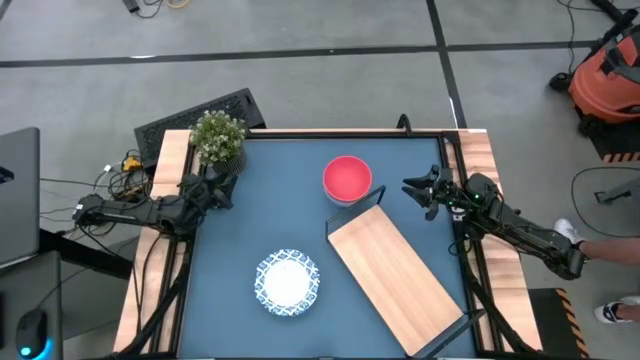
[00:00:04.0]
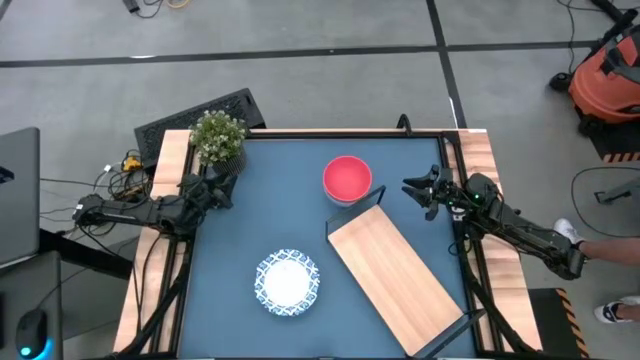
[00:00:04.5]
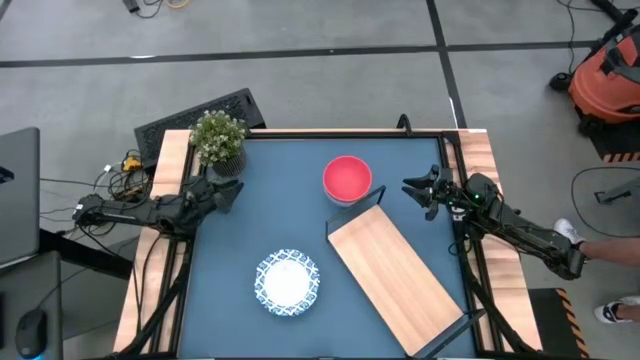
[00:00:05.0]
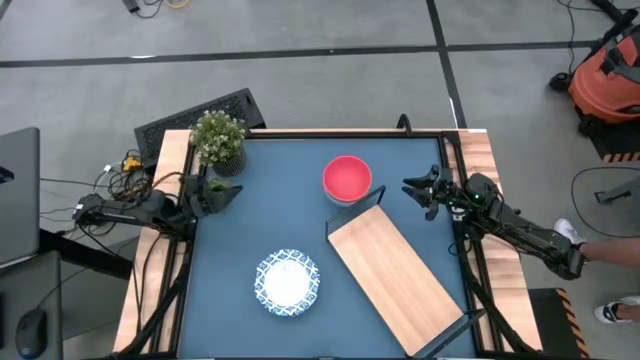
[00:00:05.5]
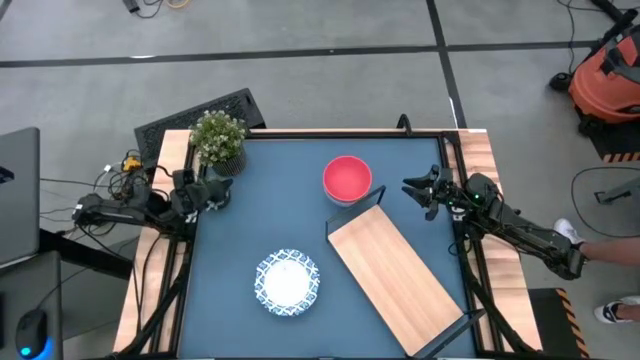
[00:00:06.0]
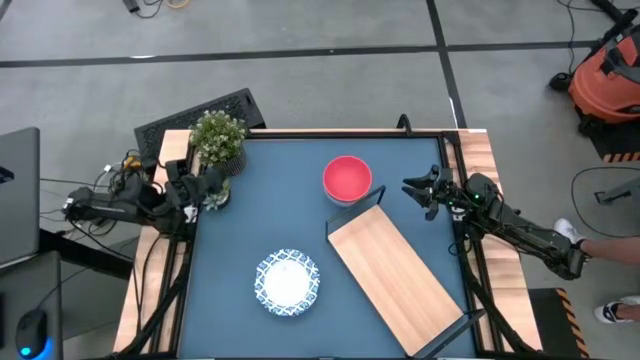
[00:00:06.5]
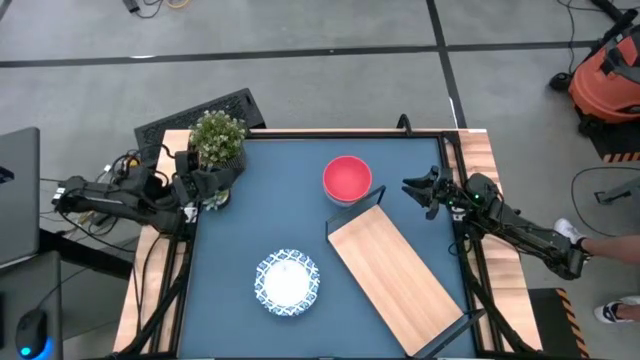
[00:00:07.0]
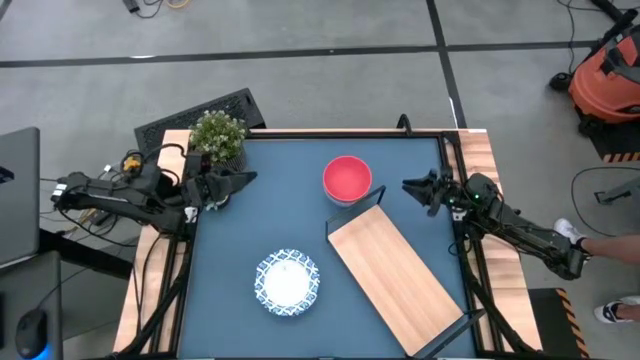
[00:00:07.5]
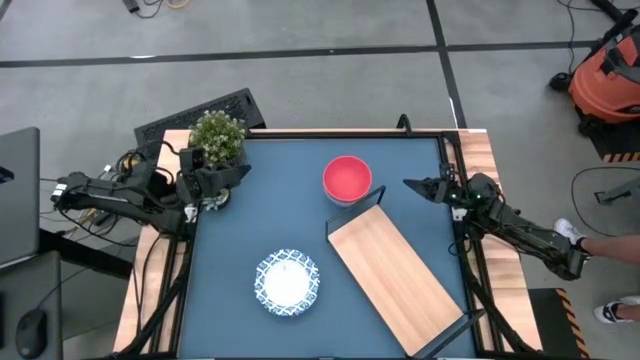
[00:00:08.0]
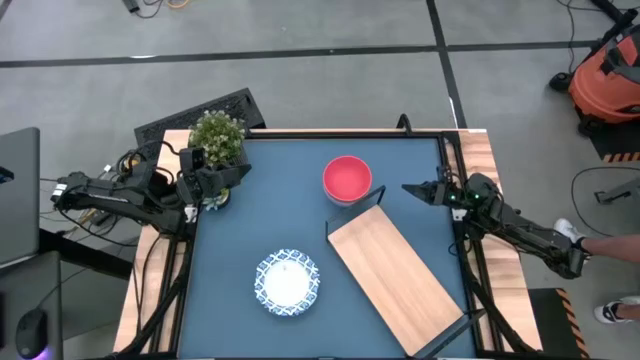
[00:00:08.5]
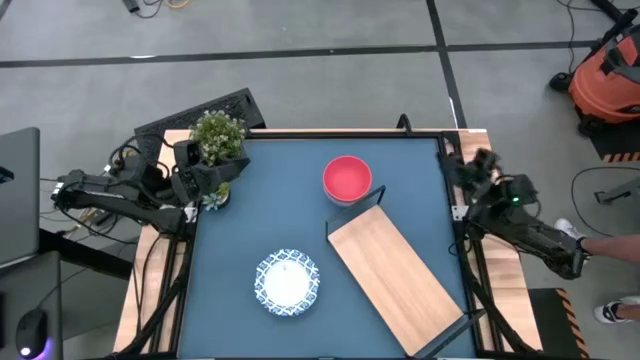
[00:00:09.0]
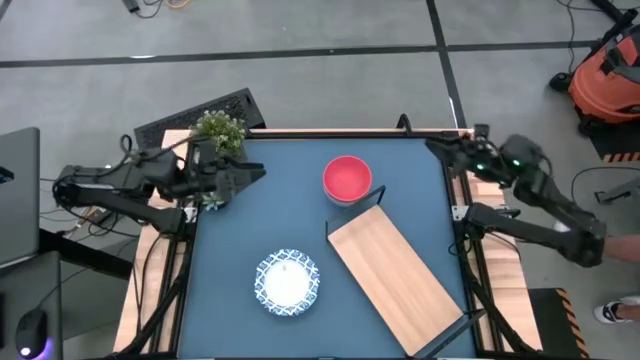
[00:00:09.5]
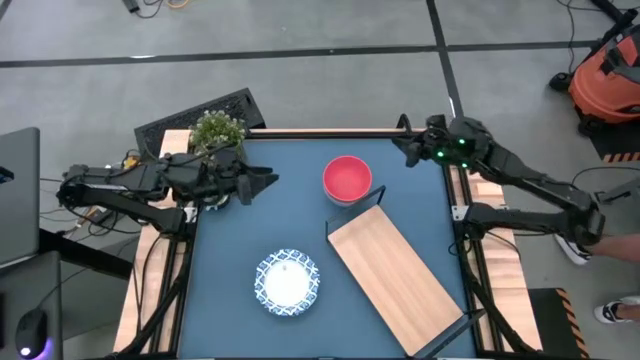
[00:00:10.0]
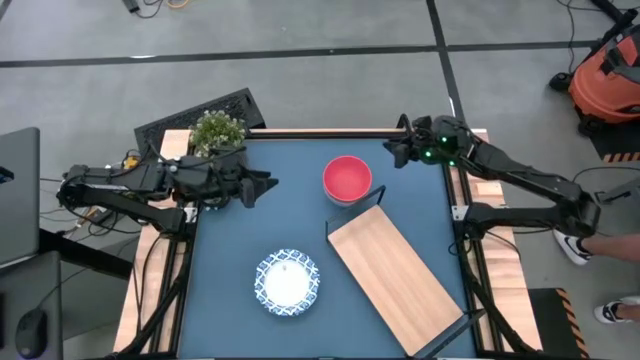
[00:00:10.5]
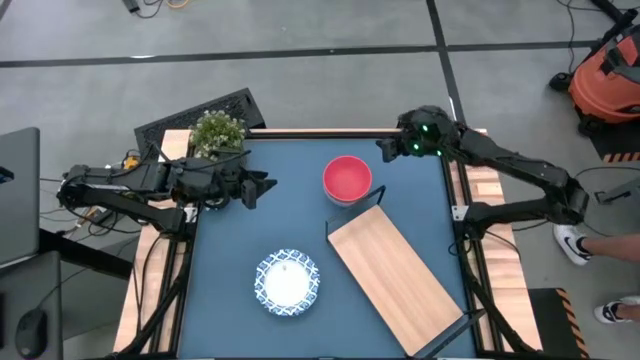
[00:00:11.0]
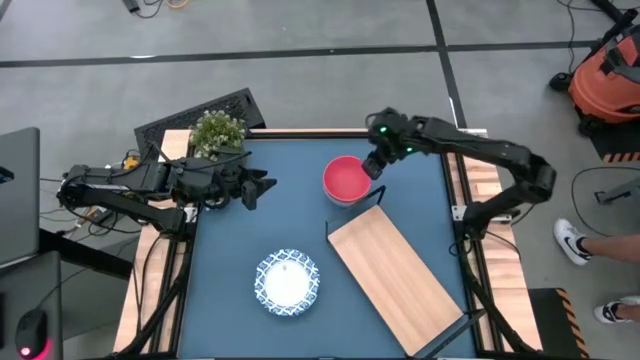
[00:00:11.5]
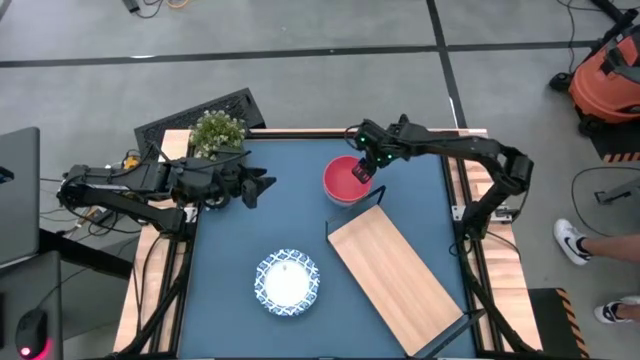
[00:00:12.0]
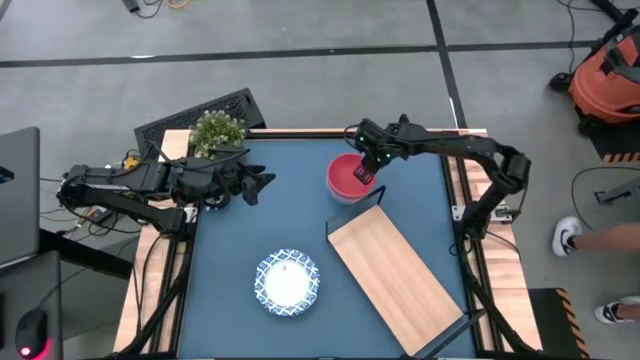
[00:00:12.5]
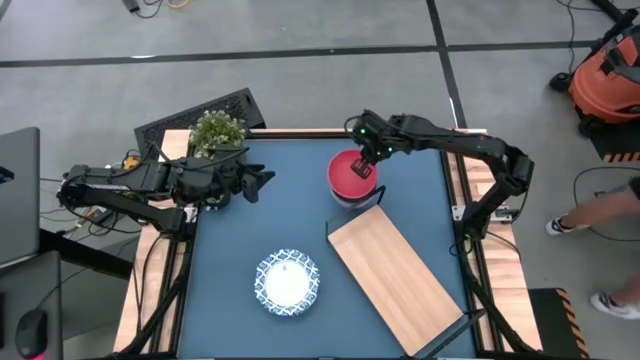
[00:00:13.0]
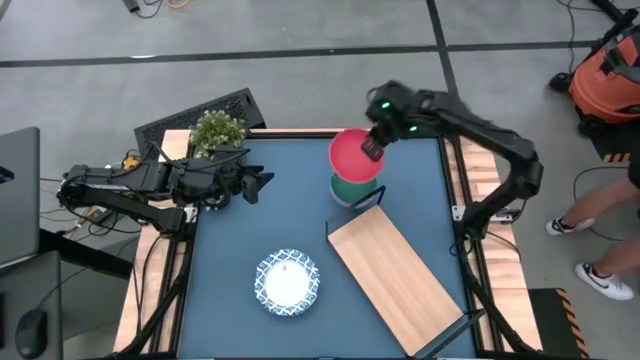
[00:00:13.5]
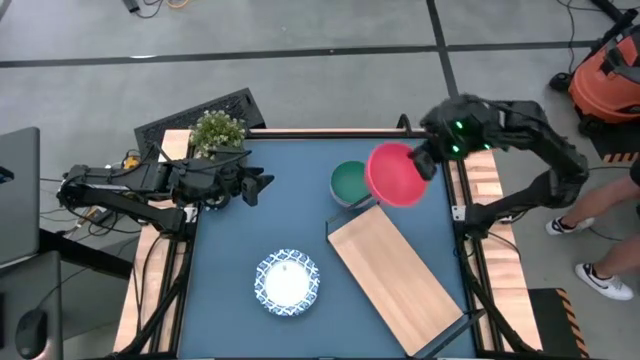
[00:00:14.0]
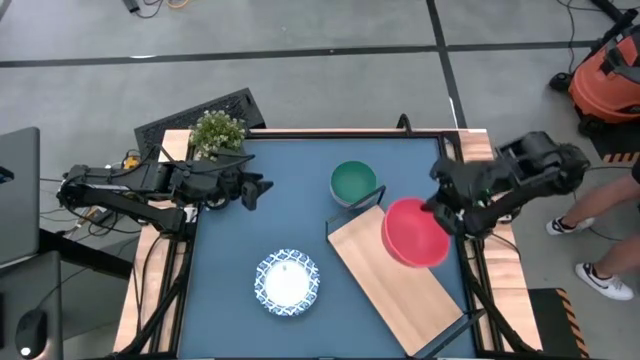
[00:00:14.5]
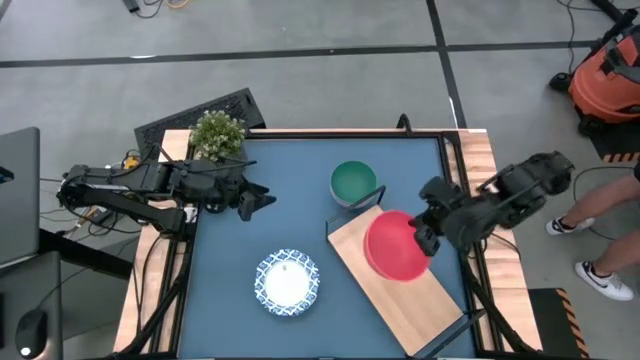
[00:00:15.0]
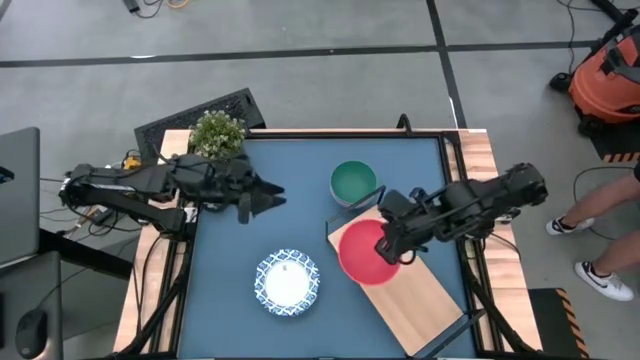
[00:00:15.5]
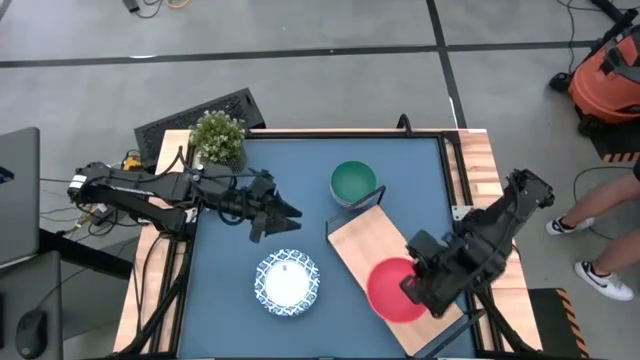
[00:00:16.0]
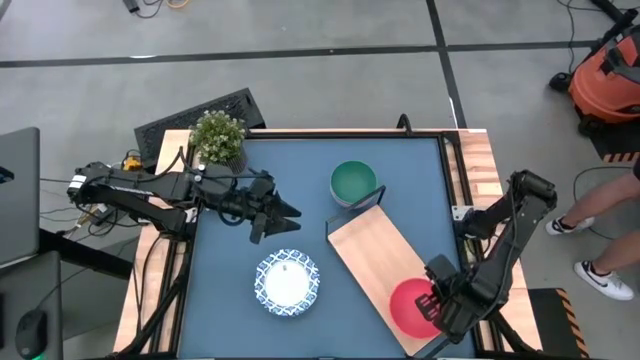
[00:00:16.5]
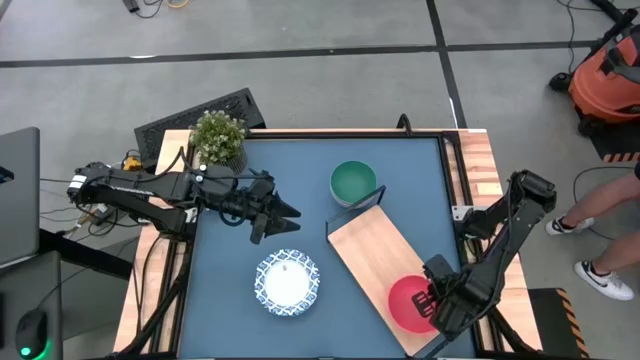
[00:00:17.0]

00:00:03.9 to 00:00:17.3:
Task: Place and stack bowls onto a shelf
Put the orange bowl on the shelf

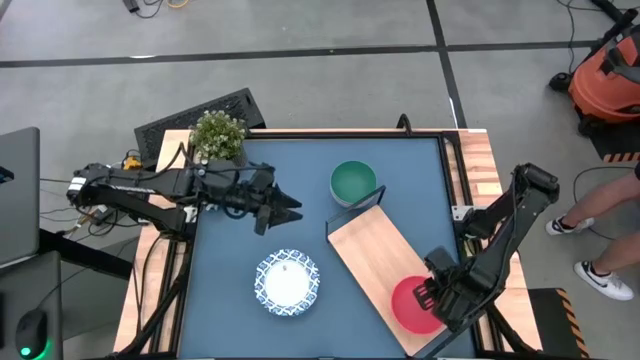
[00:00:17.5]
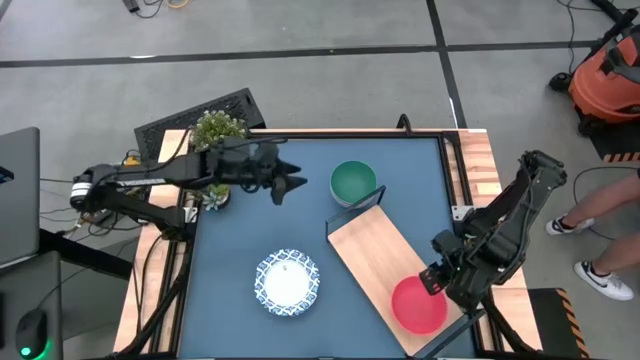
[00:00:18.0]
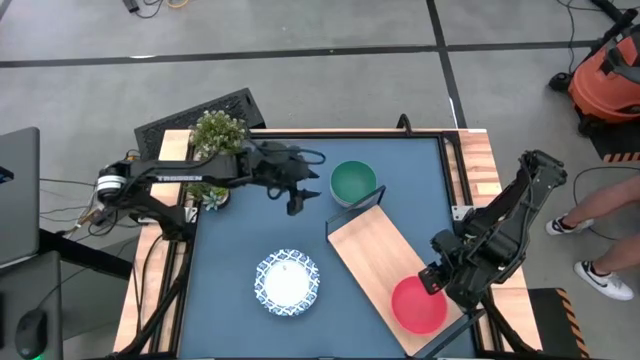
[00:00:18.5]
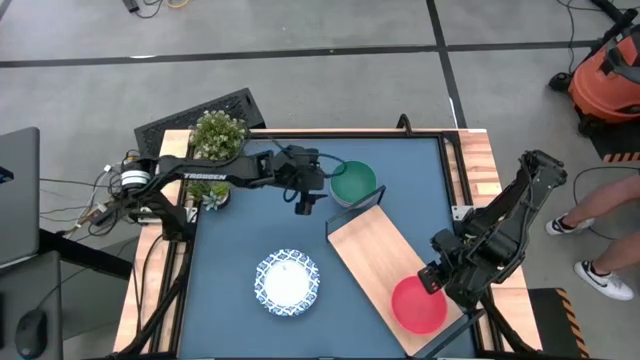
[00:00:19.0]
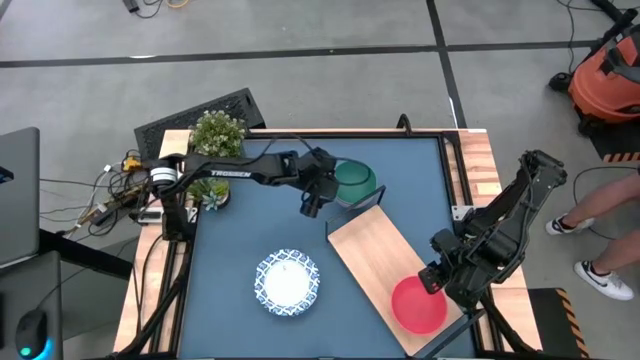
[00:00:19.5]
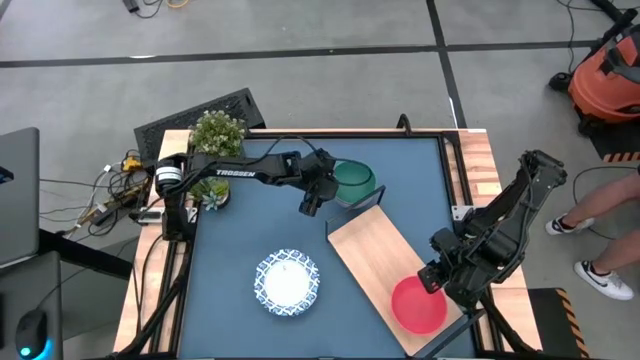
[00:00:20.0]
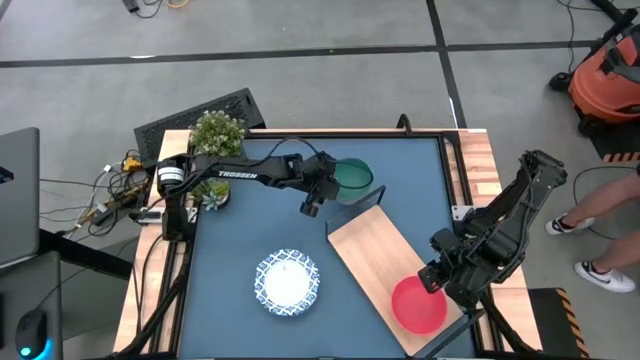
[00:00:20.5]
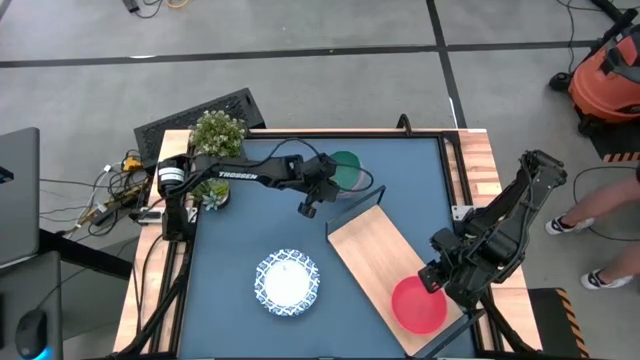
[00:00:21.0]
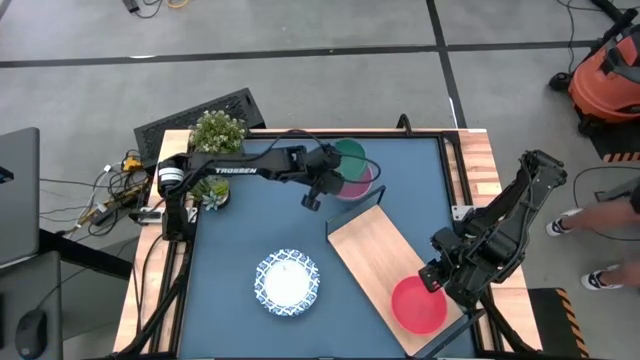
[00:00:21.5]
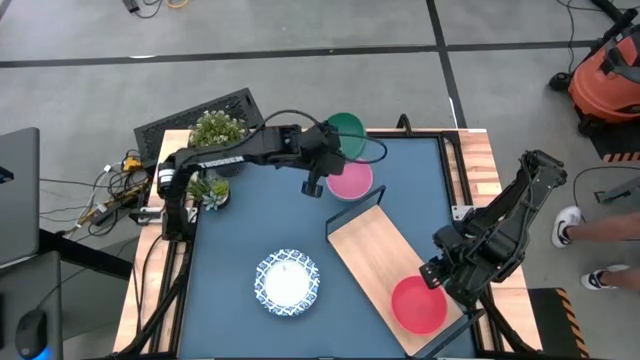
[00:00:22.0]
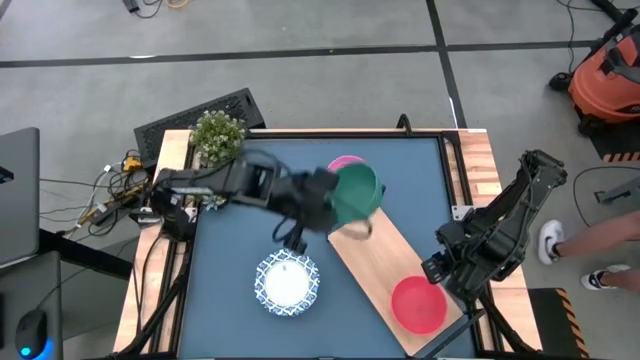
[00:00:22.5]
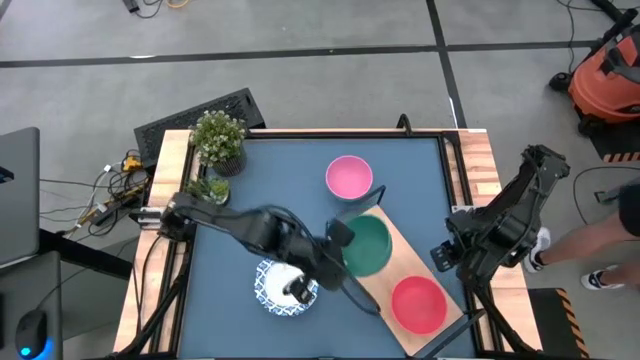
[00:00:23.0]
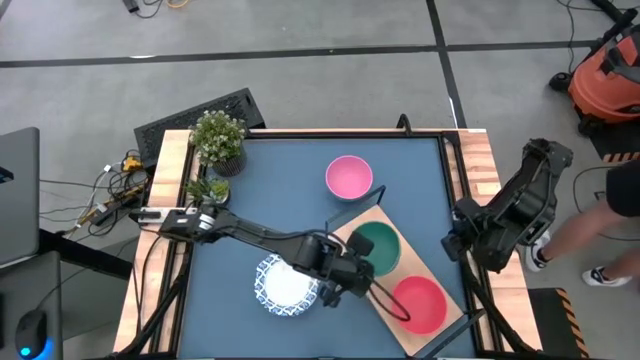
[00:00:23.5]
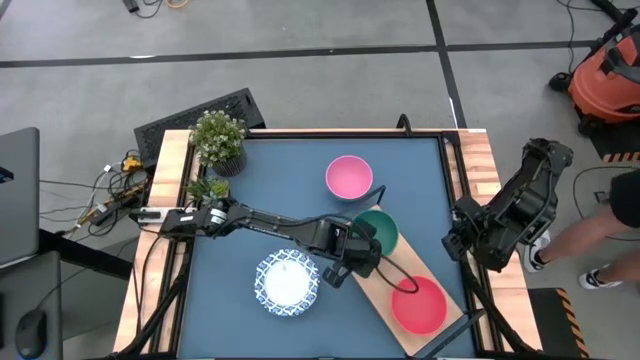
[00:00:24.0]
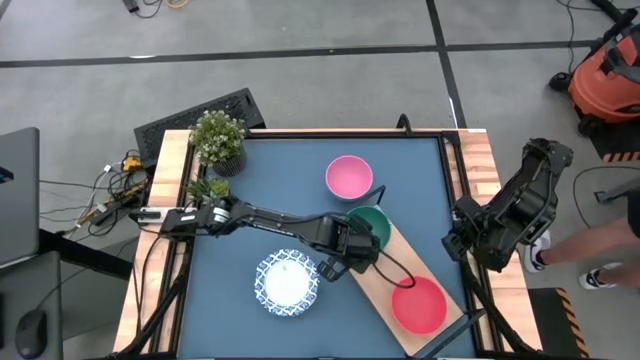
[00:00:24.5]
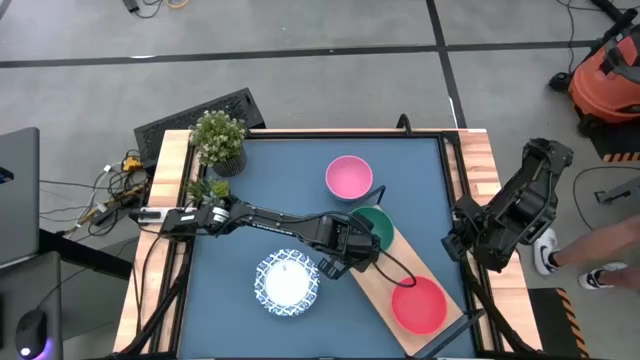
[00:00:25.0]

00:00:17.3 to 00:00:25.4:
Put the green bowl on the shelf
